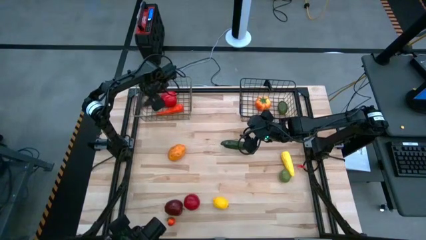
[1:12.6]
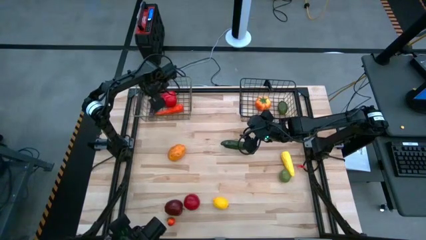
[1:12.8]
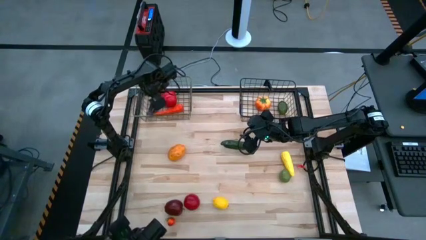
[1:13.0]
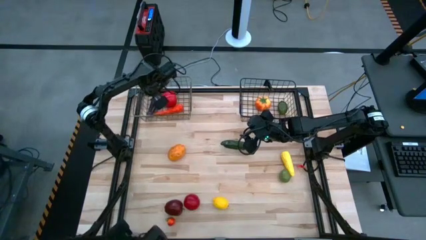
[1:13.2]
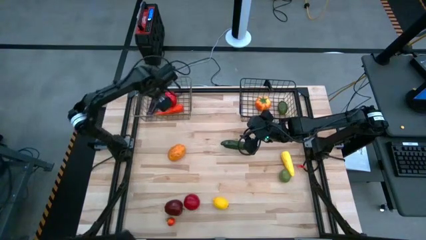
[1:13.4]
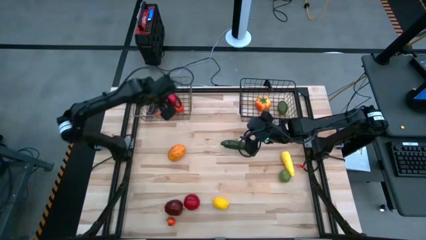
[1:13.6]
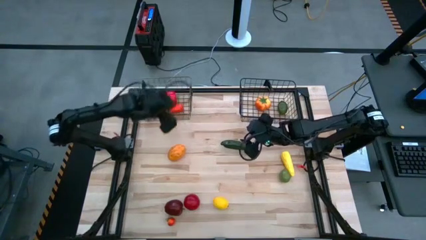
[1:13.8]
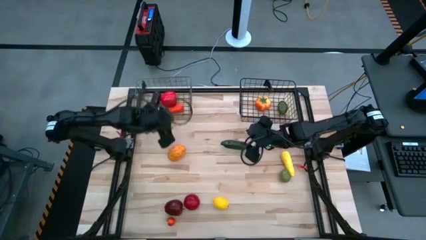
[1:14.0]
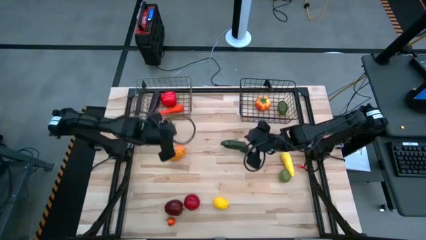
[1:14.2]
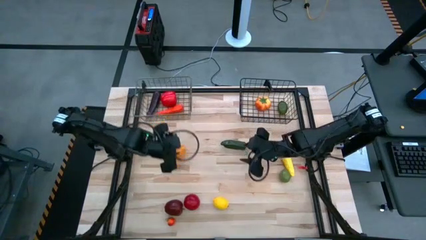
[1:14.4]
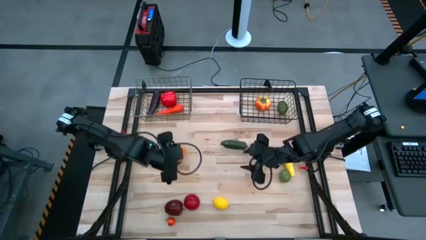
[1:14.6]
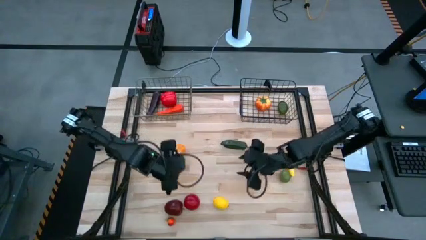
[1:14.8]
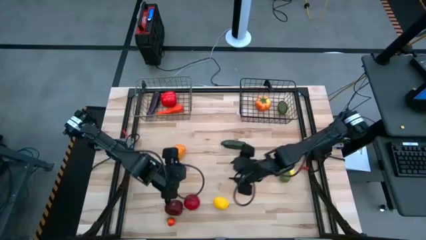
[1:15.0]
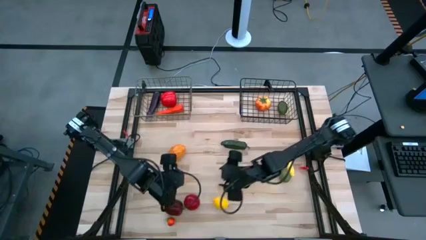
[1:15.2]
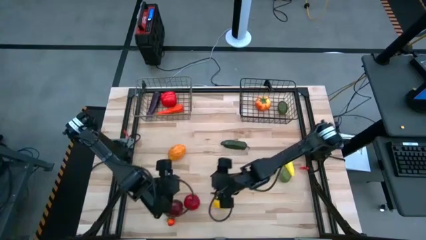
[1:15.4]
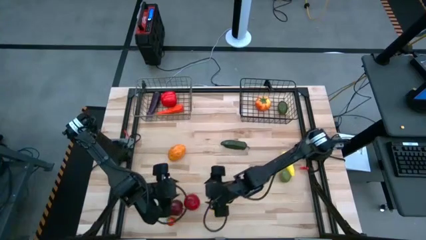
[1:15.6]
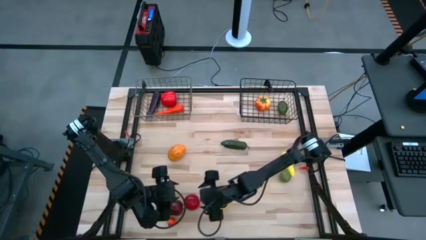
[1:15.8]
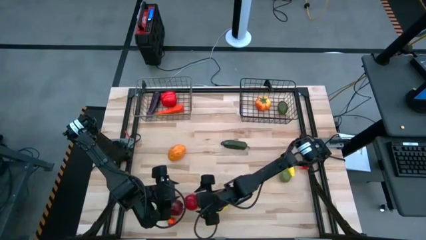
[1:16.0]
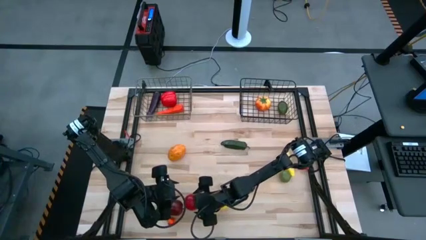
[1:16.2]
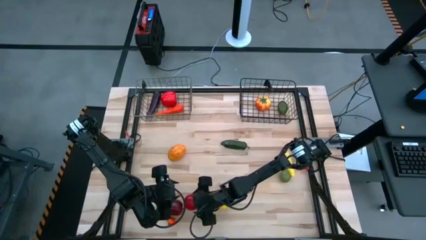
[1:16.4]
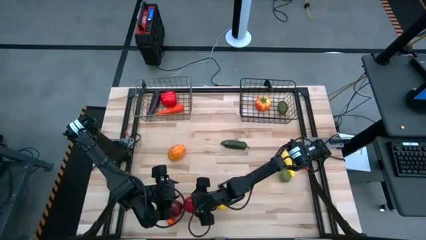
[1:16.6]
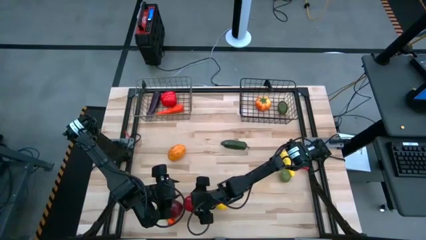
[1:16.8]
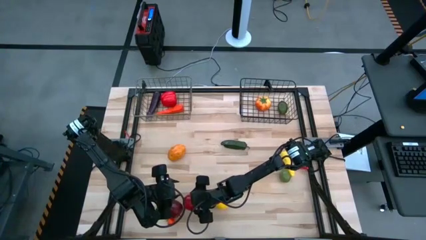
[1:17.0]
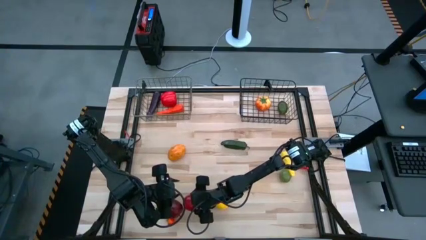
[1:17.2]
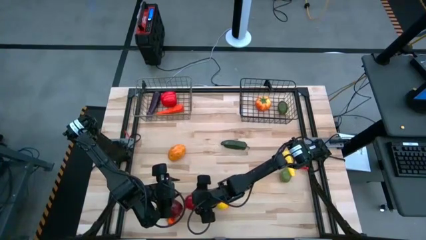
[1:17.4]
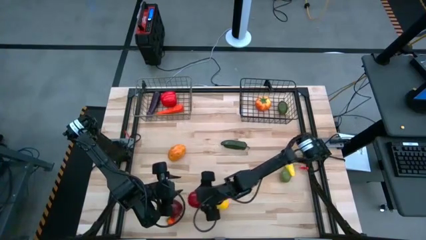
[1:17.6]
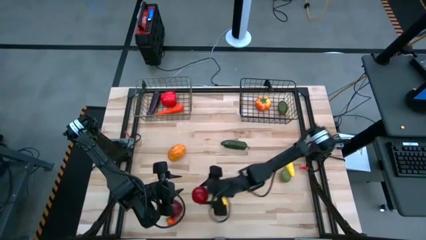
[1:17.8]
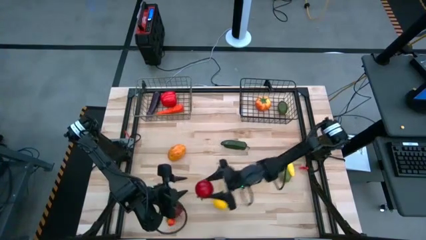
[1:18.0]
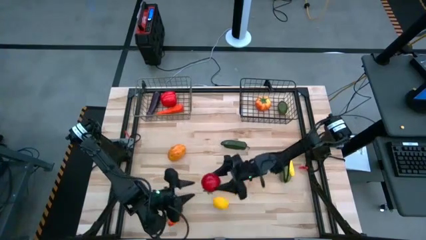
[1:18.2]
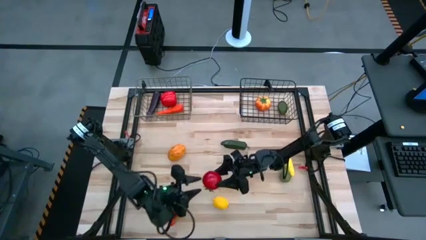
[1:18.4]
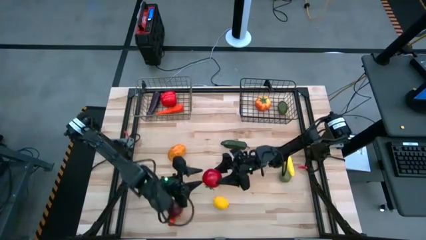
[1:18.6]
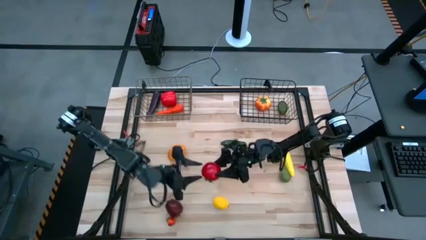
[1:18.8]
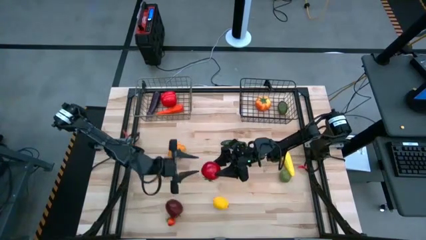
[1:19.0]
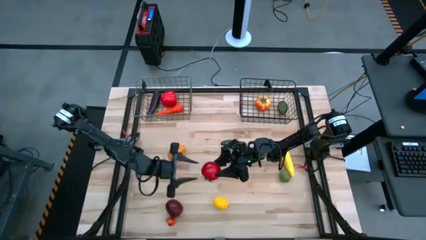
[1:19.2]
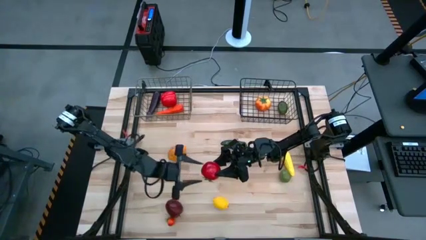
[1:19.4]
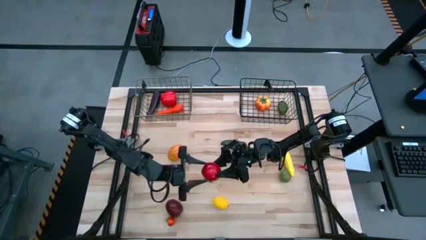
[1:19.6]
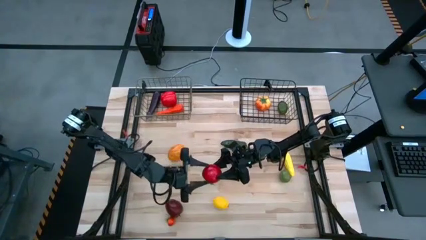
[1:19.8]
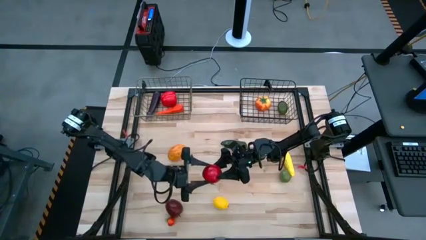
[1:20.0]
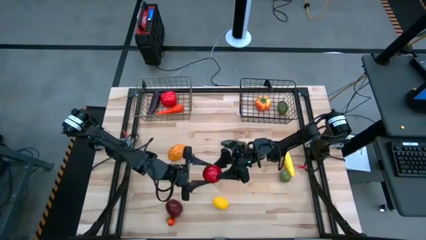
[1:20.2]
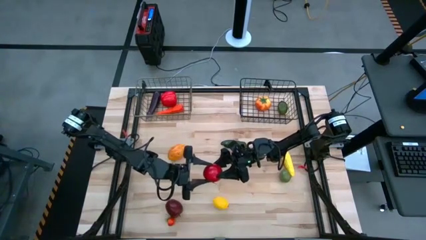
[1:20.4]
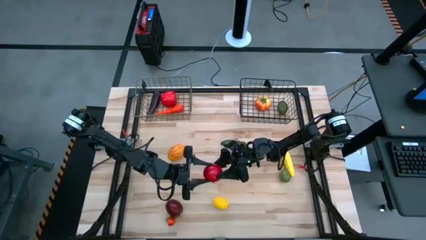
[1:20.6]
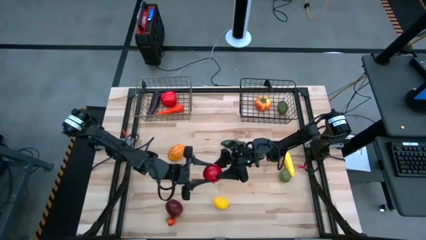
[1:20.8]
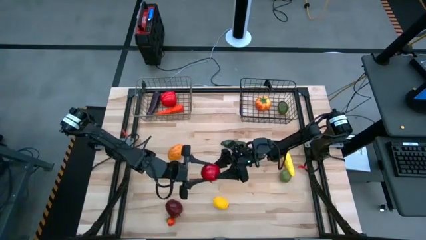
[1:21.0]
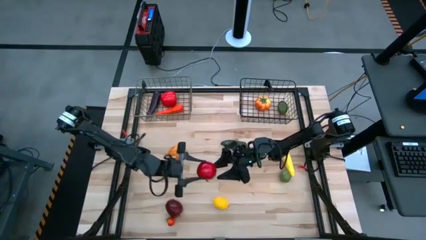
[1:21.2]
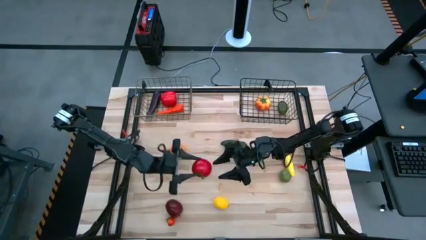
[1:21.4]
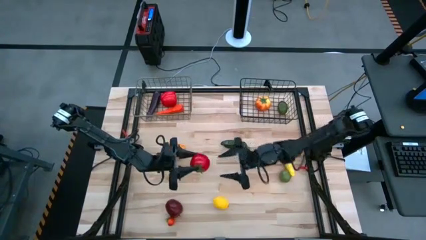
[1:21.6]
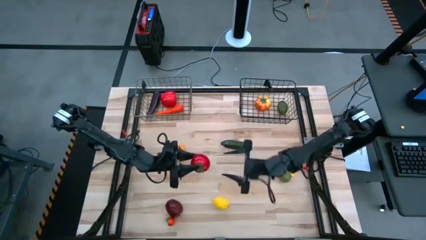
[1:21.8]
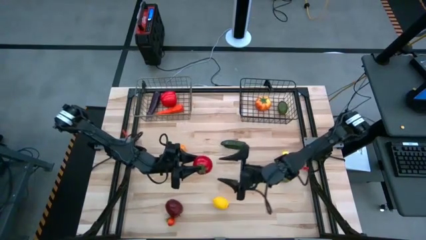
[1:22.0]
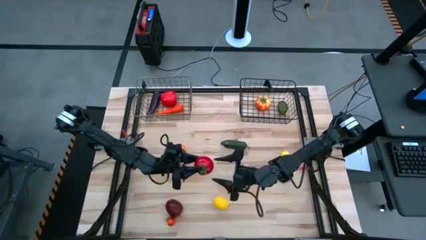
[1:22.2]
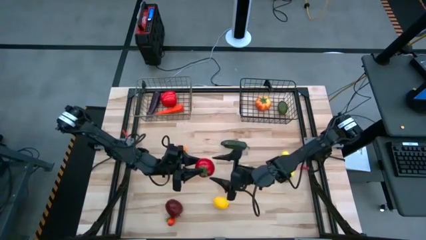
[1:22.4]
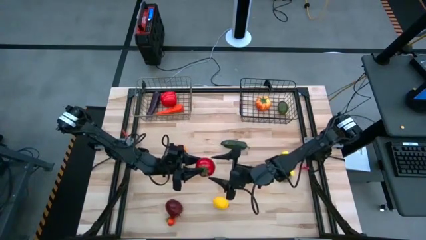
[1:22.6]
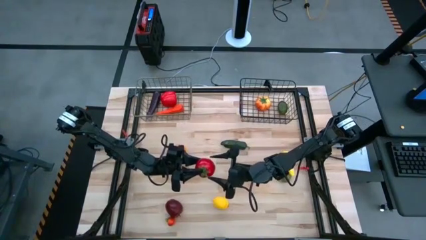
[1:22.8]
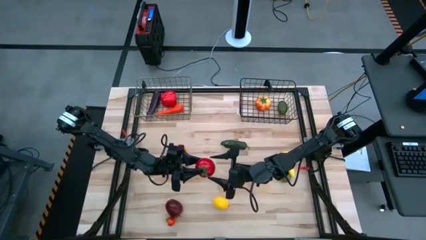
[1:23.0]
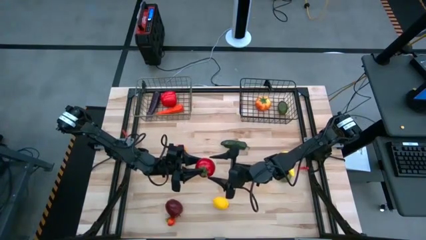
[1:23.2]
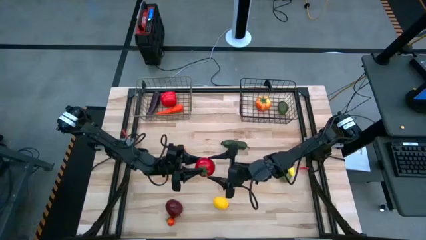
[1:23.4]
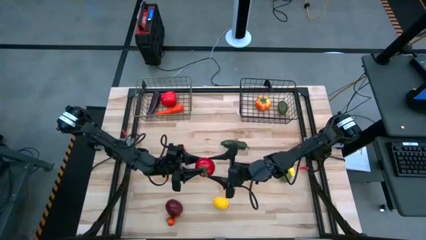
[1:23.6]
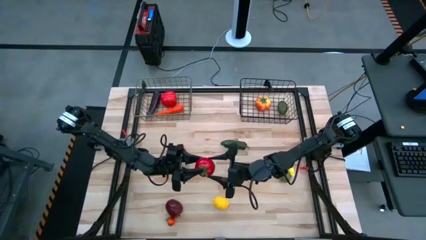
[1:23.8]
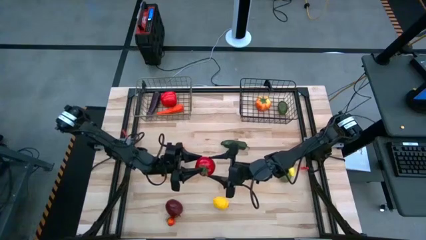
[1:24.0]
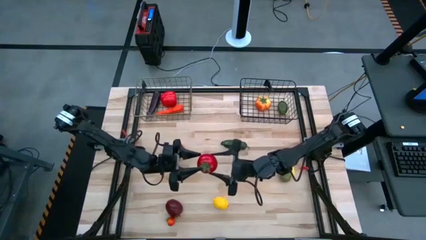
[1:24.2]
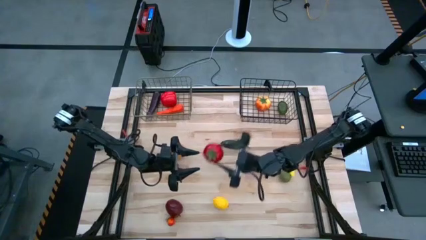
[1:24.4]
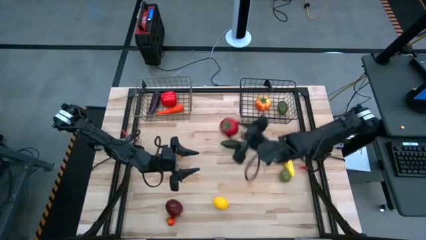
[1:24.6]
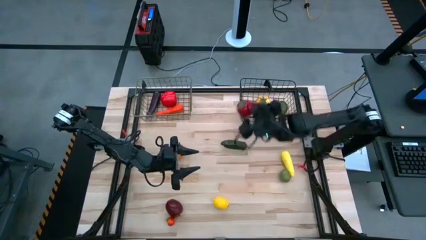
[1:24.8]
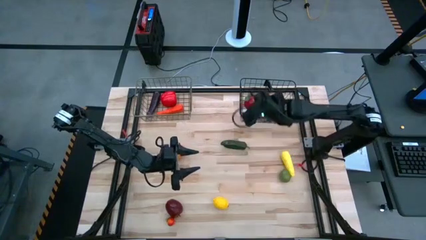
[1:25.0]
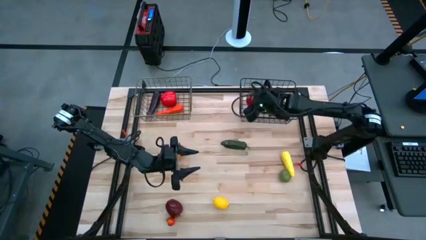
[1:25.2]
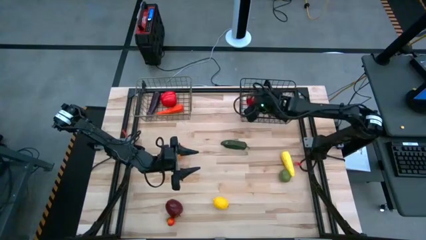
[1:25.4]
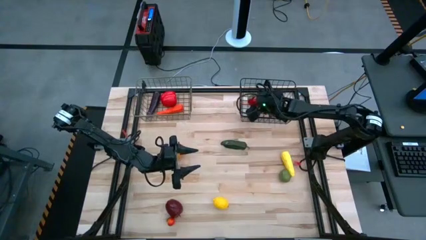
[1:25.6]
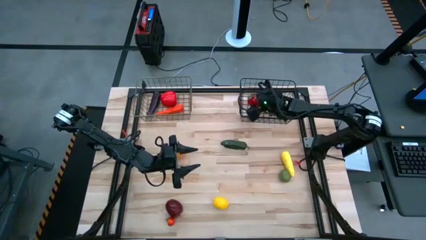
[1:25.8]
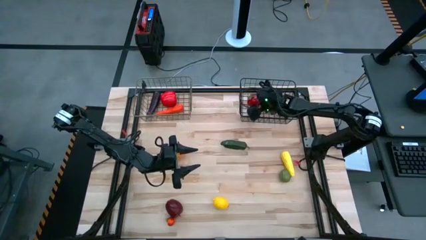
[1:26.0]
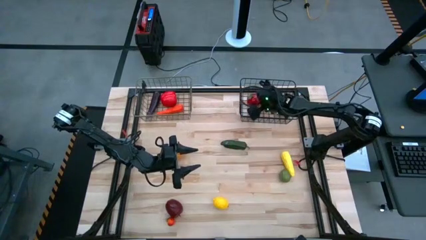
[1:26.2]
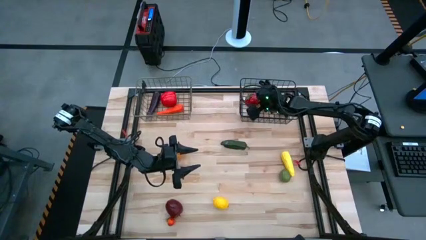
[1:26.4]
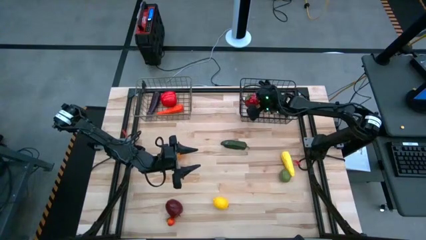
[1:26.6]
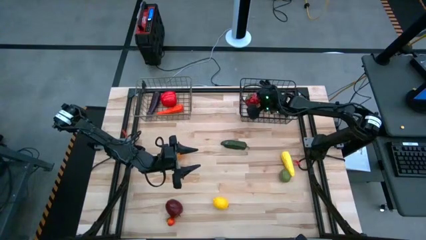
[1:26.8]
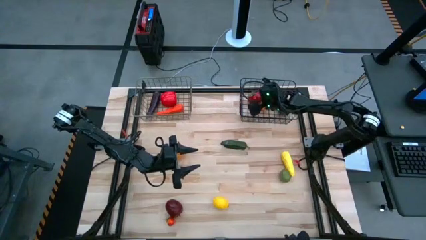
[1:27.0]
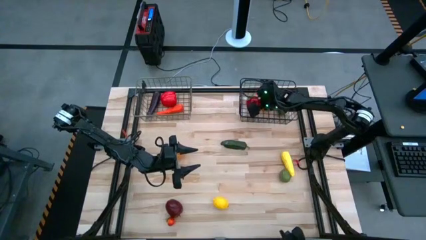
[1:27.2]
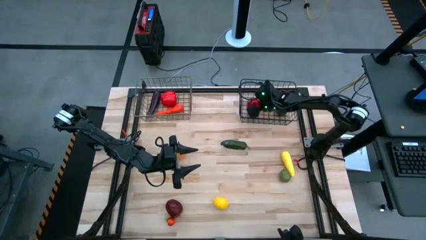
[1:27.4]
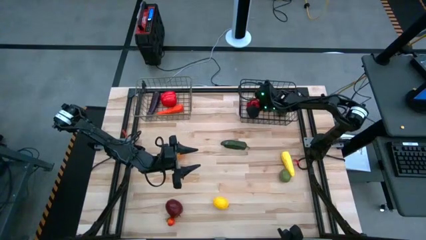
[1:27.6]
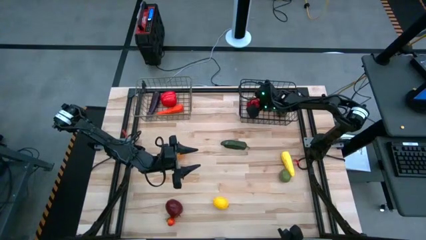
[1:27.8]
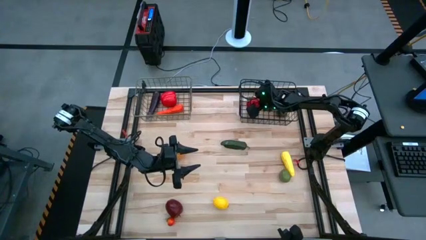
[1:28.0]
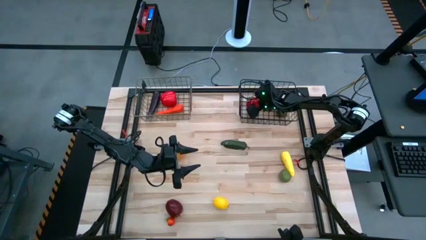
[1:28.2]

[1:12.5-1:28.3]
Task: Sort produce into baskets
Put the large tomato into the black wire basket
